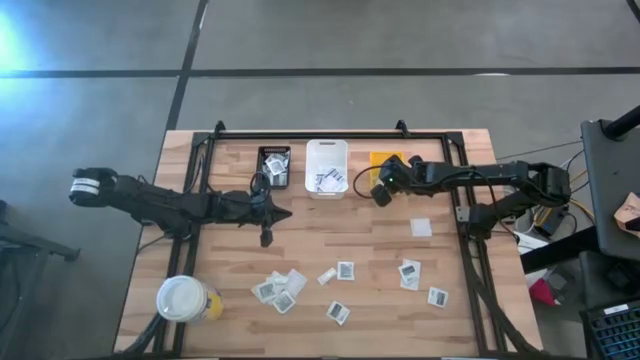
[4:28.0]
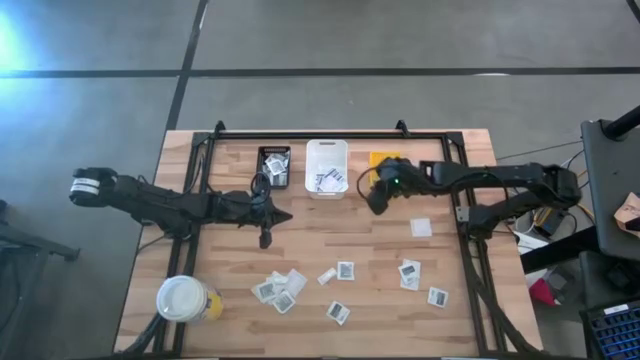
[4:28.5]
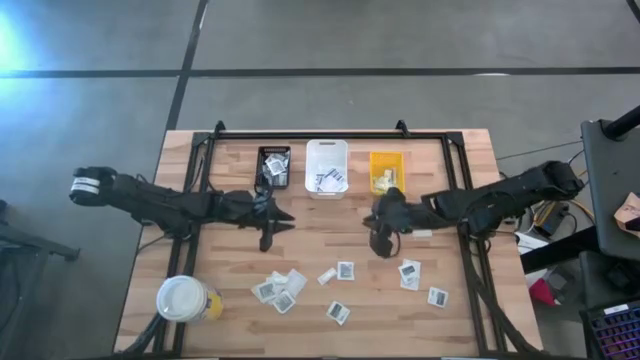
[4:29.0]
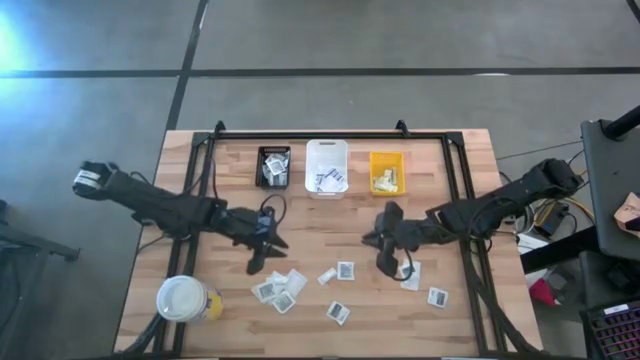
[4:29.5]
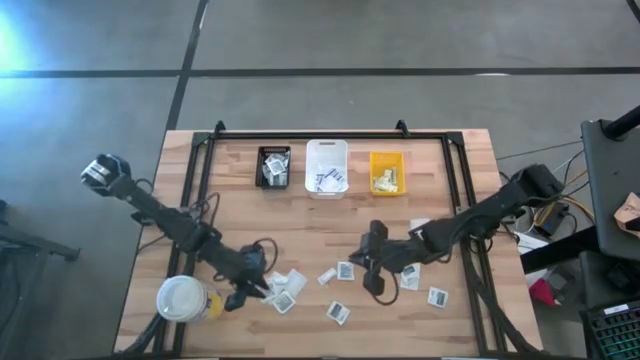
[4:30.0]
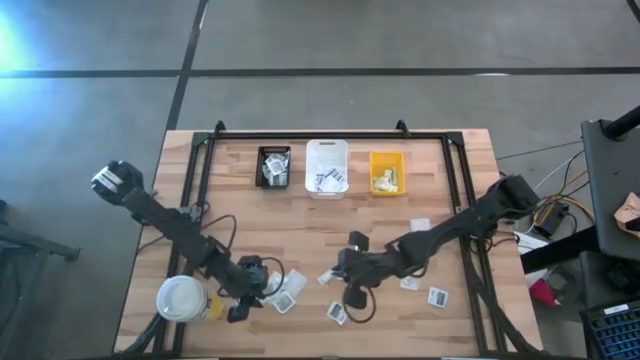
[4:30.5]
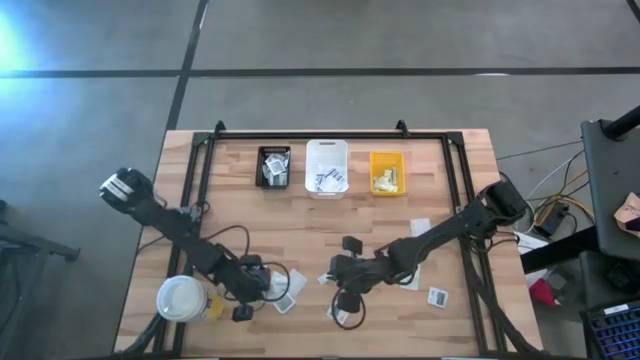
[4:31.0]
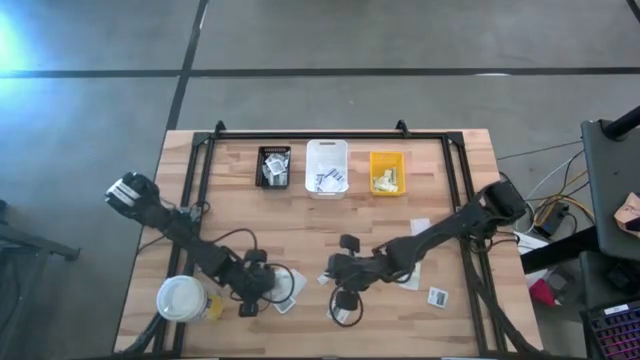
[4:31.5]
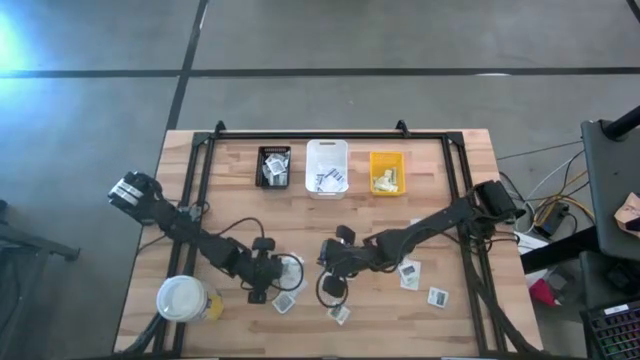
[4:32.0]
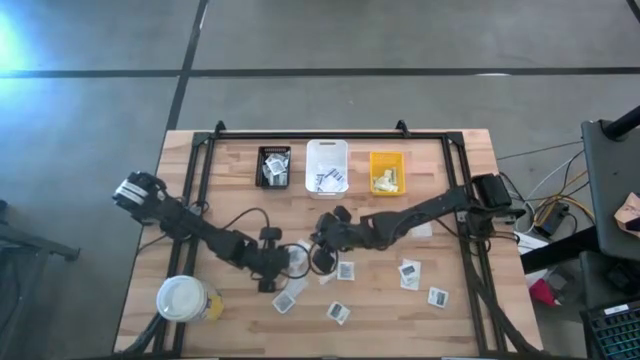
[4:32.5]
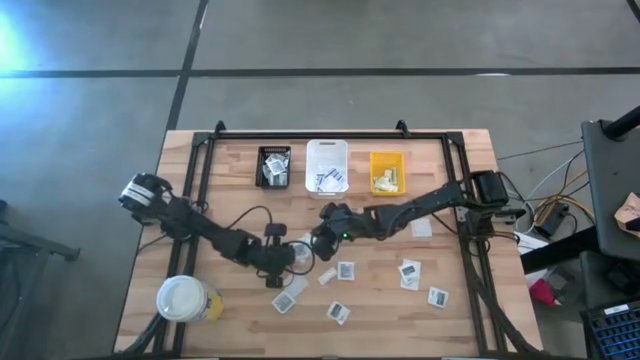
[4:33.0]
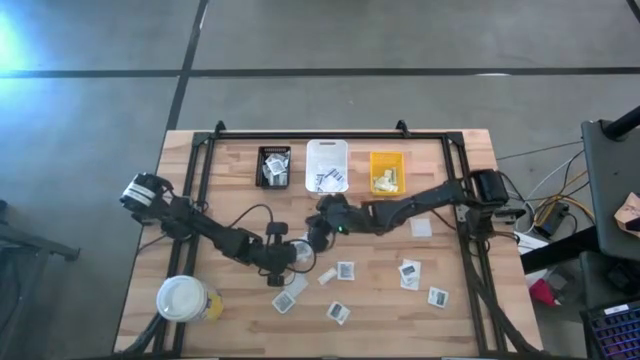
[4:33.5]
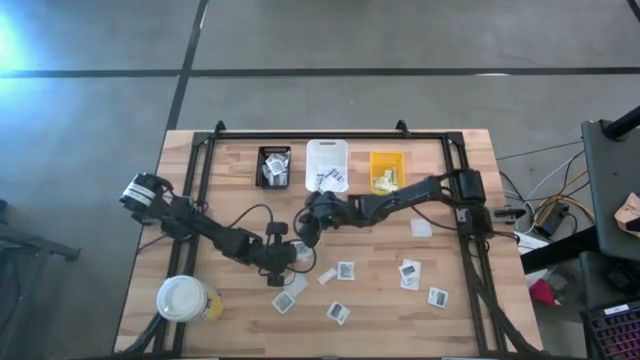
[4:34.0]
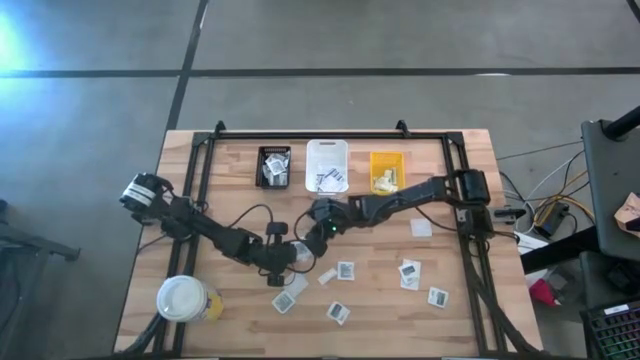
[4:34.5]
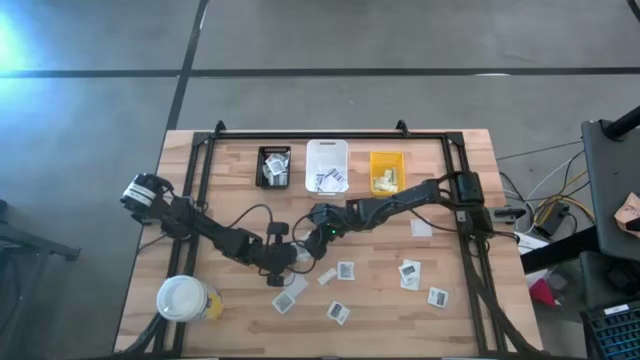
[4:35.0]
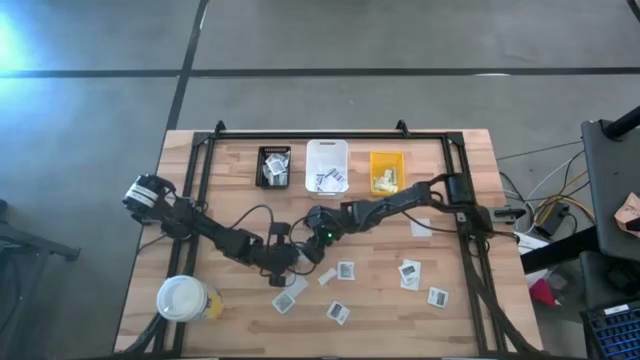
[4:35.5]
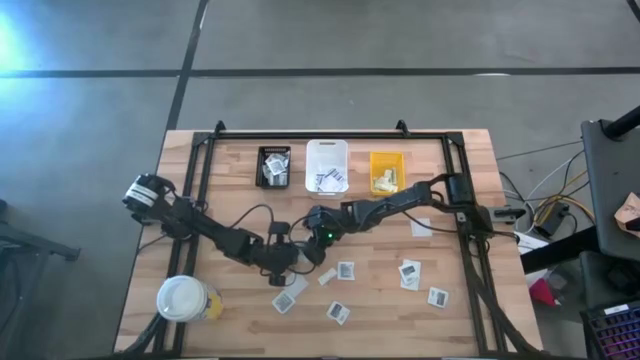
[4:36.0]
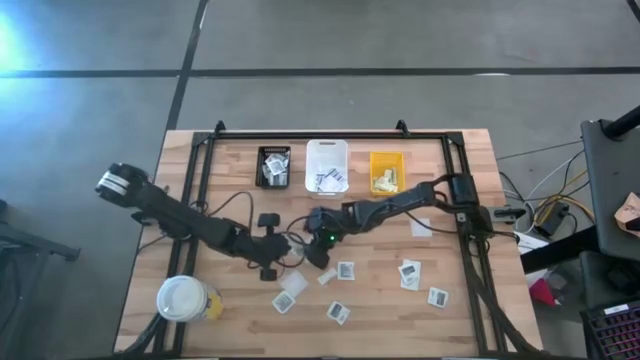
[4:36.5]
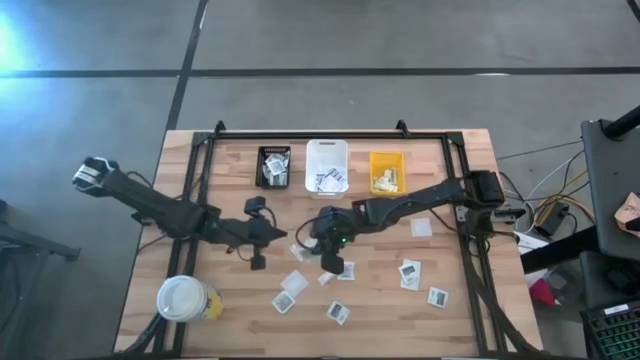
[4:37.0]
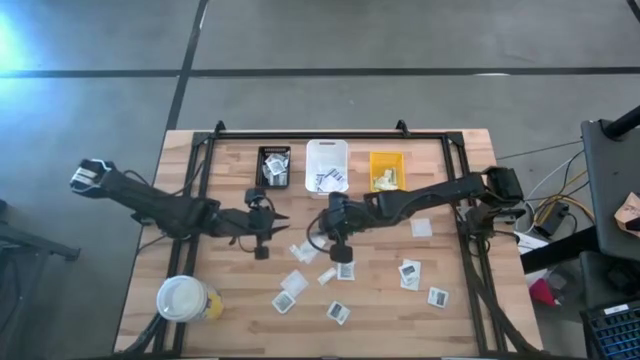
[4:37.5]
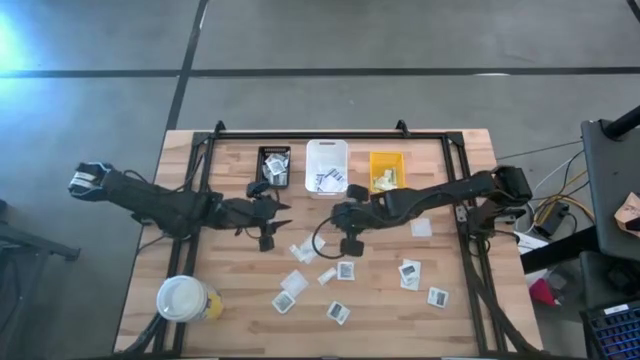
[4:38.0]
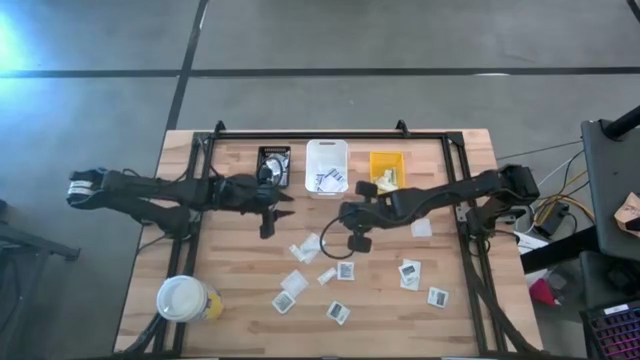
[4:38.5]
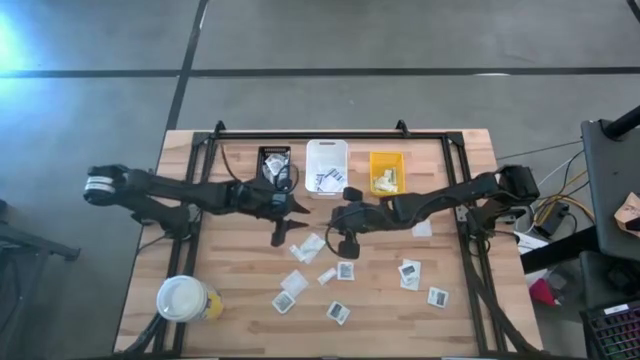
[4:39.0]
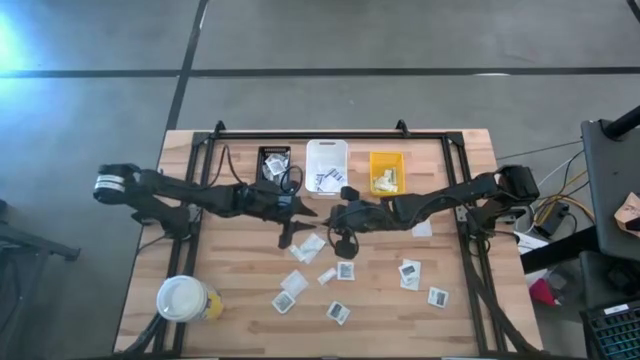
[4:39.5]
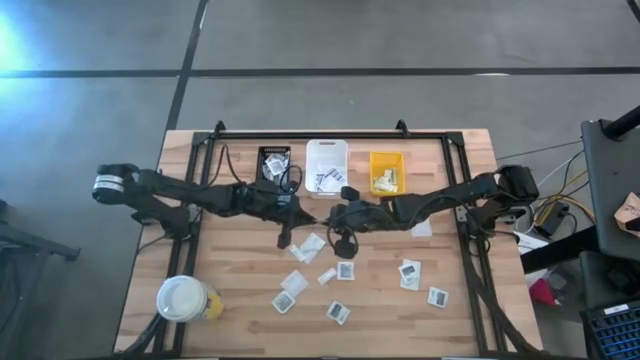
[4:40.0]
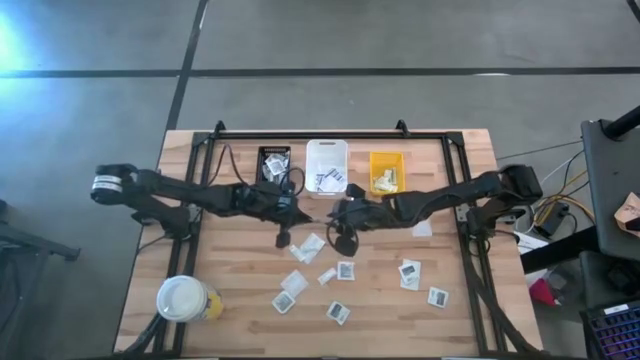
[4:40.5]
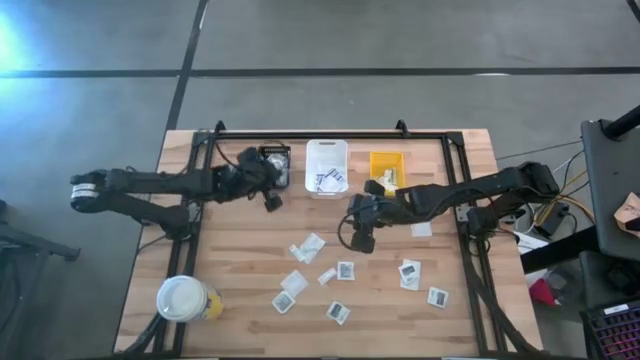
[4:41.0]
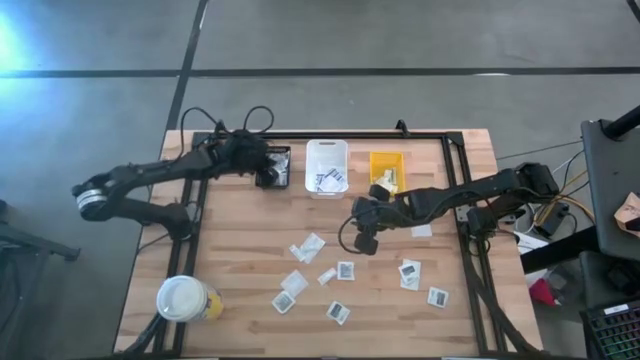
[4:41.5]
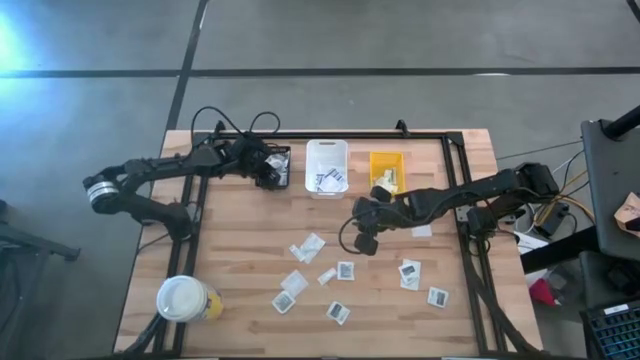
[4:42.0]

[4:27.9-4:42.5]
Task: Pick & Place First Aid Supplies
Put the towelette pack into the black basket

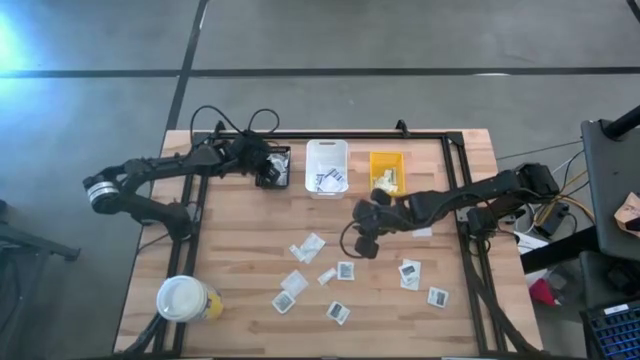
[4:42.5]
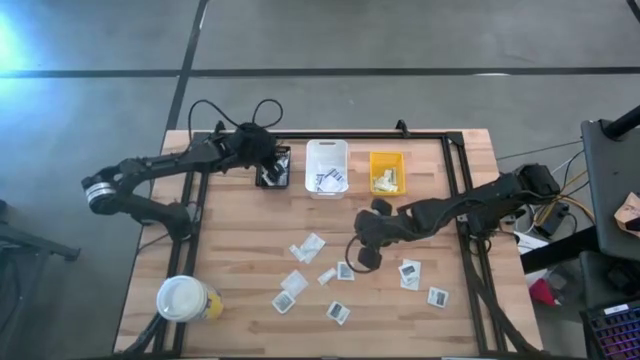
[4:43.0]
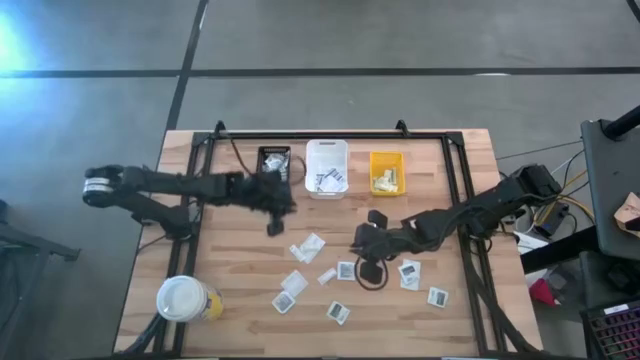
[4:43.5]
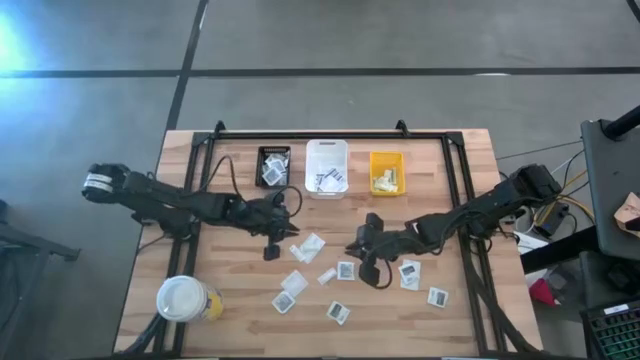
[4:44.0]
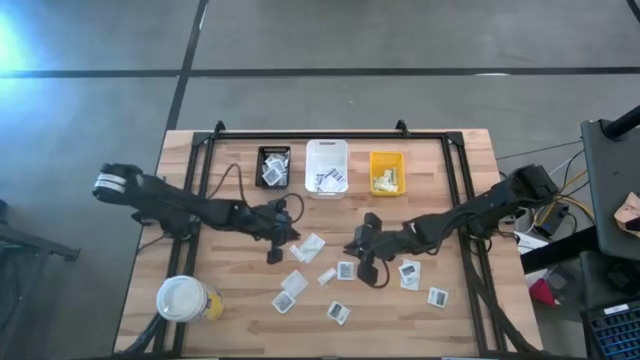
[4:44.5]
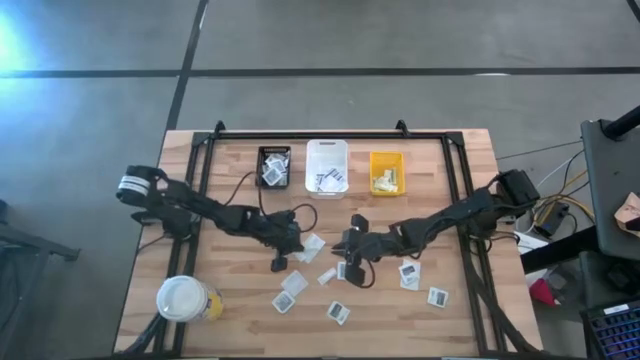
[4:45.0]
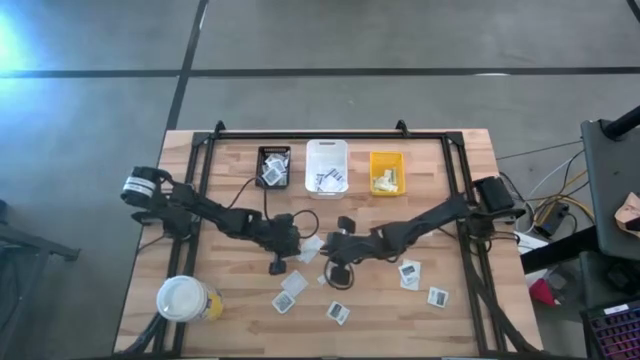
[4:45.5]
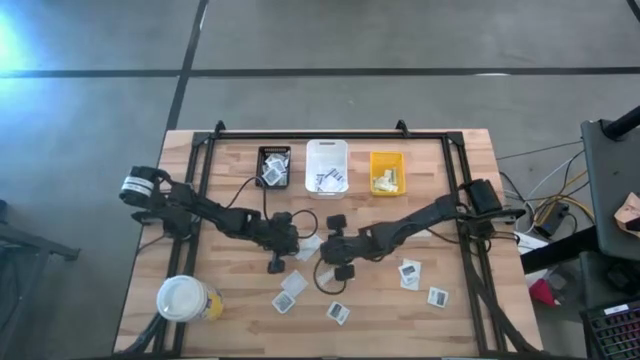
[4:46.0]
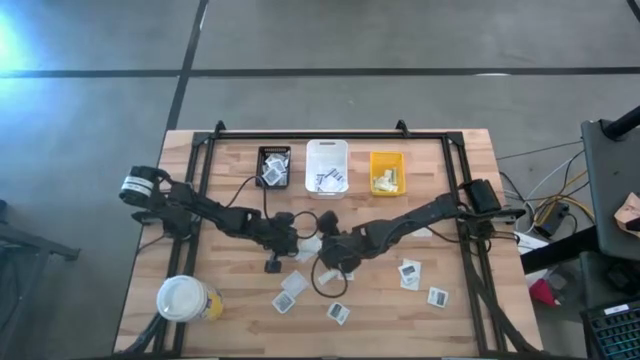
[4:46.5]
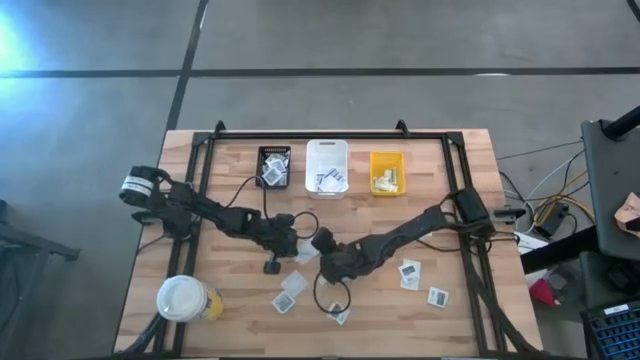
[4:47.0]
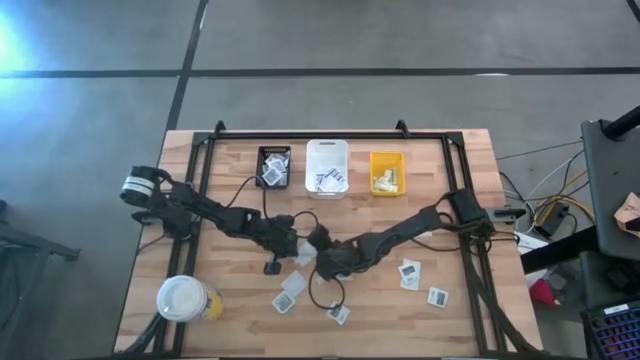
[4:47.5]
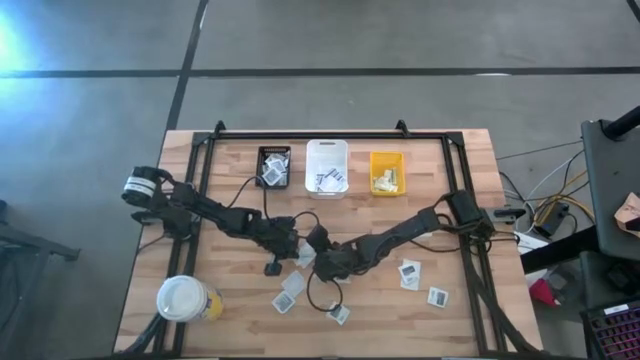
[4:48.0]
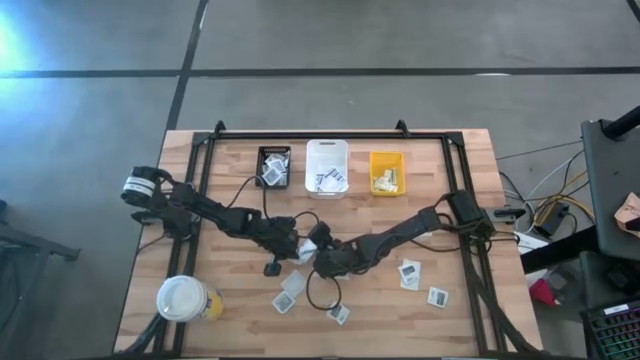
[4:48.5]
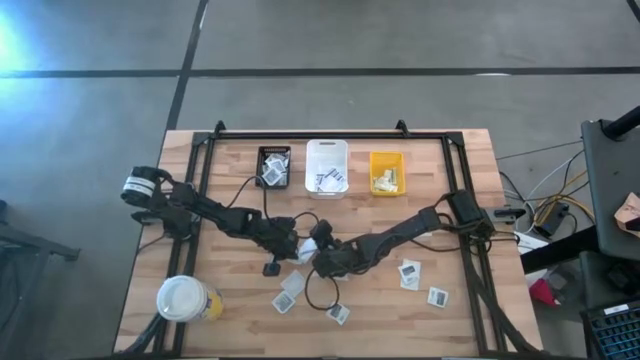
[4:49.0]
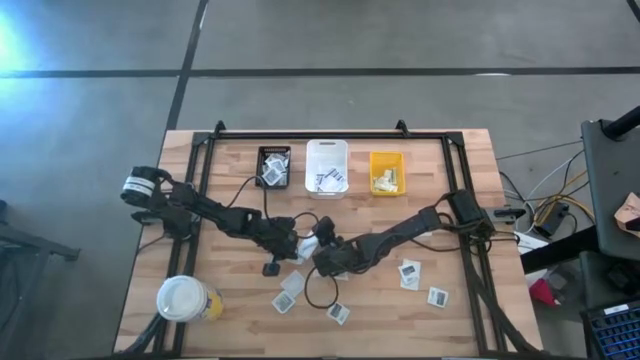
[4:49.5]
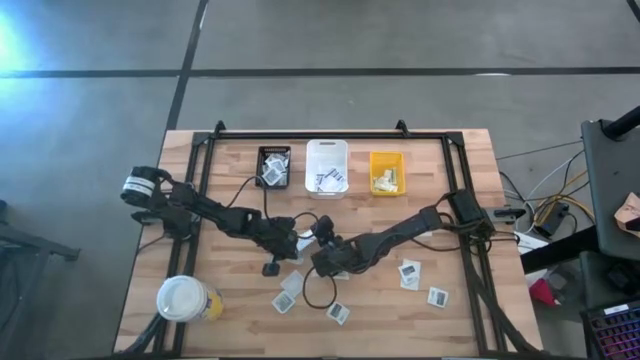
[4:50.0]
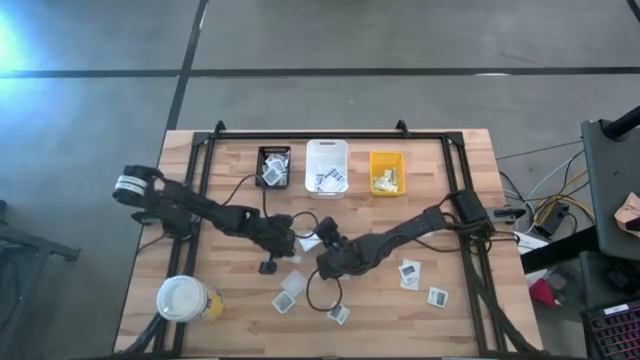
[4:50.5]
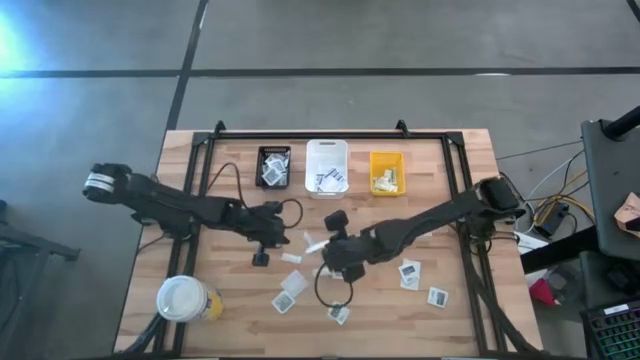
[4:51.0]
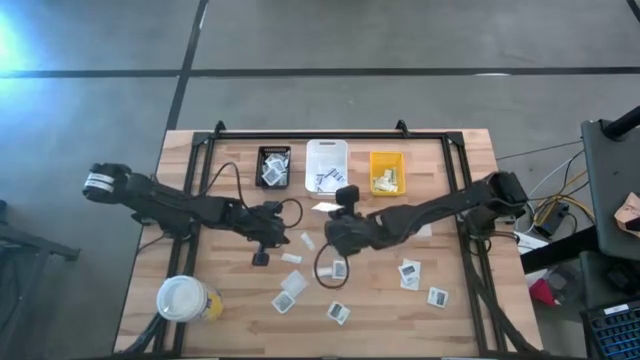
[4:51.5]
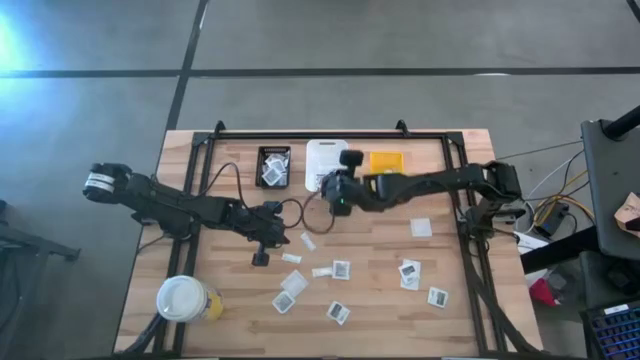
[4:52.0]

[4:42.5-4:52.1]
Put the blue bandage into the white bin
